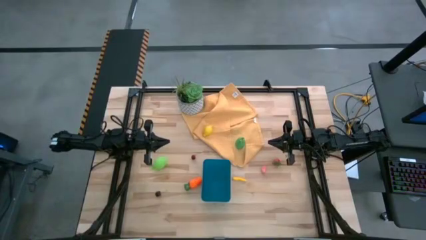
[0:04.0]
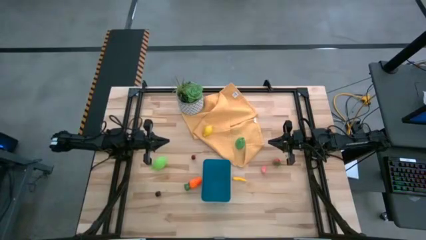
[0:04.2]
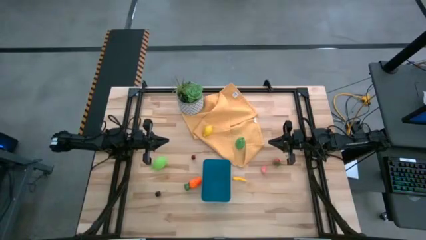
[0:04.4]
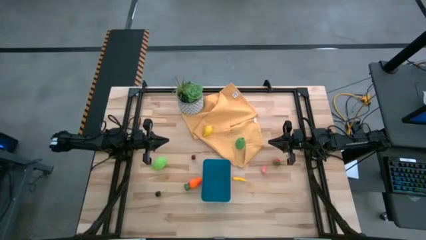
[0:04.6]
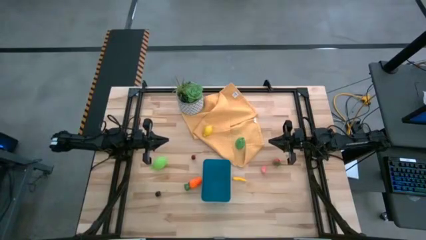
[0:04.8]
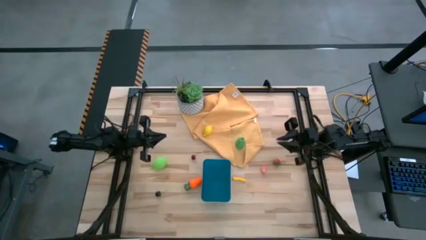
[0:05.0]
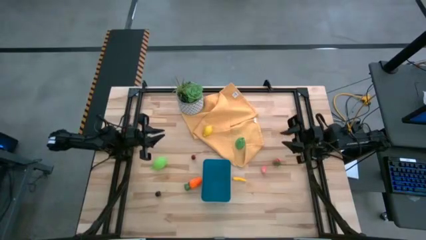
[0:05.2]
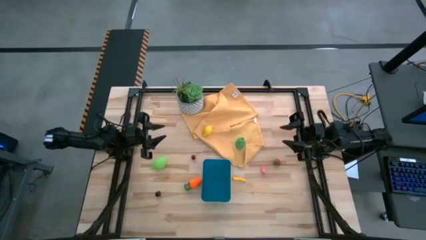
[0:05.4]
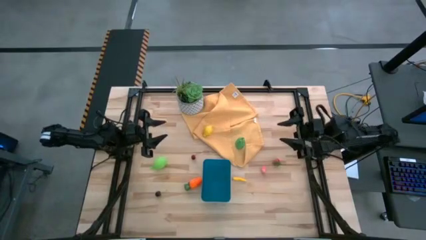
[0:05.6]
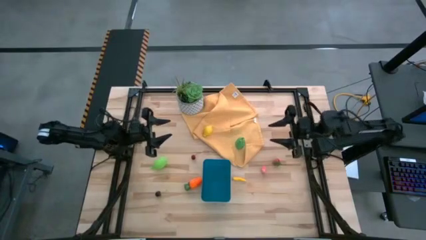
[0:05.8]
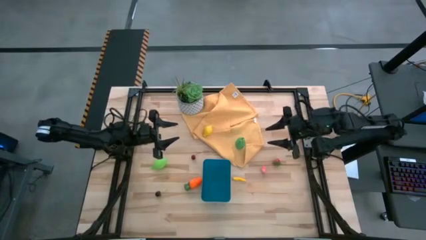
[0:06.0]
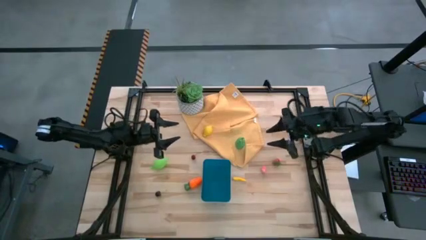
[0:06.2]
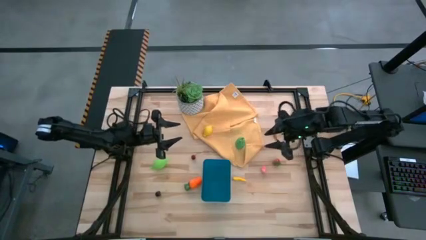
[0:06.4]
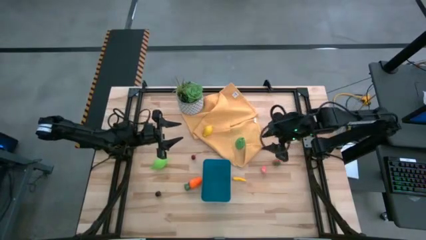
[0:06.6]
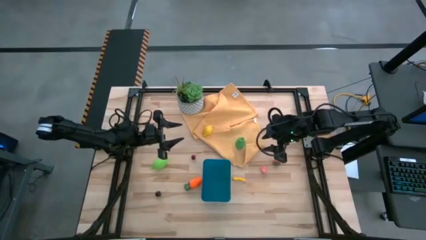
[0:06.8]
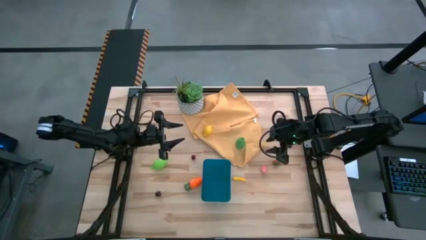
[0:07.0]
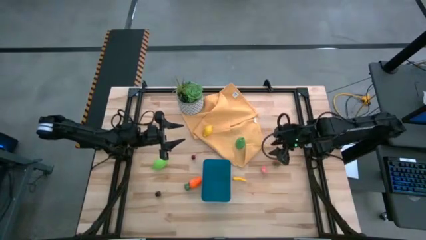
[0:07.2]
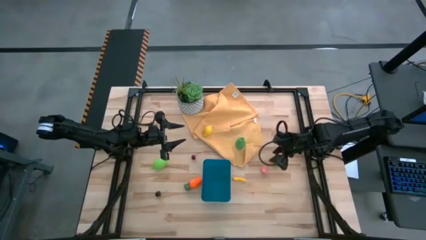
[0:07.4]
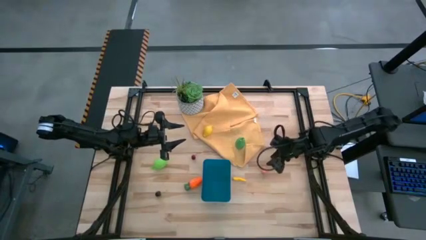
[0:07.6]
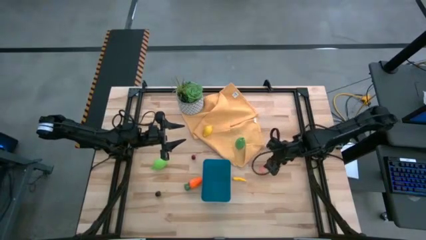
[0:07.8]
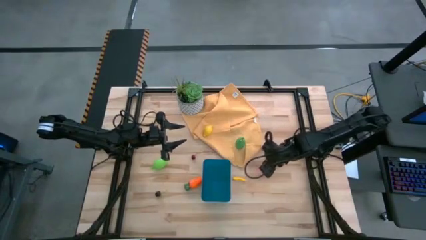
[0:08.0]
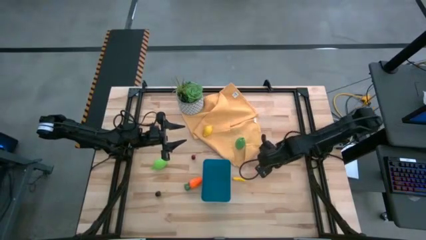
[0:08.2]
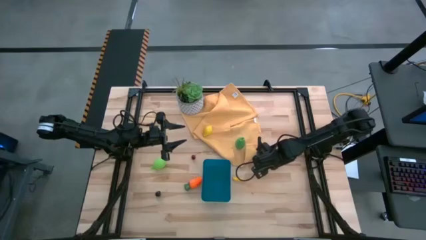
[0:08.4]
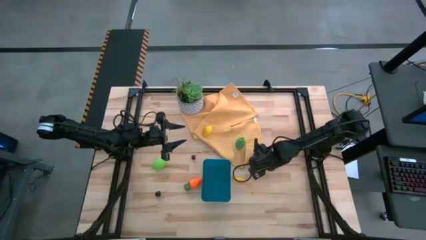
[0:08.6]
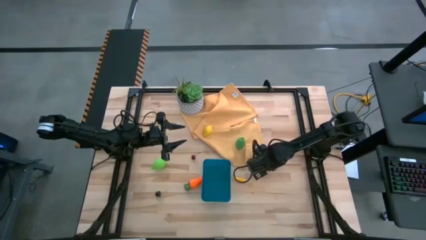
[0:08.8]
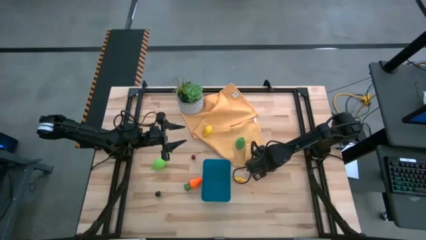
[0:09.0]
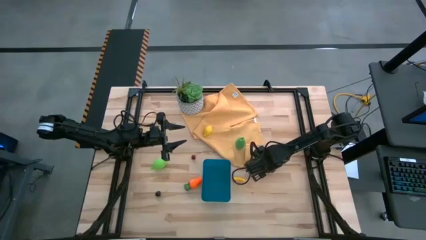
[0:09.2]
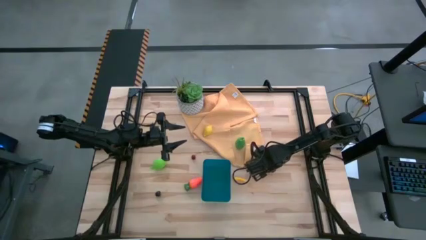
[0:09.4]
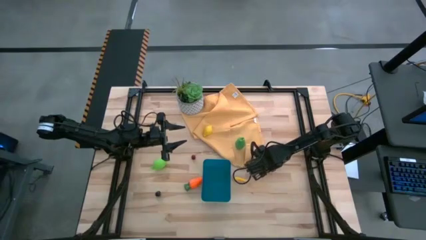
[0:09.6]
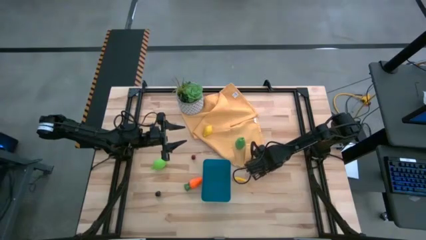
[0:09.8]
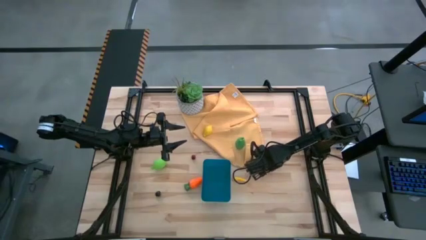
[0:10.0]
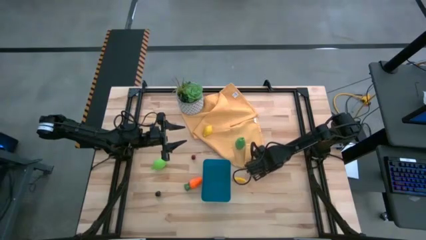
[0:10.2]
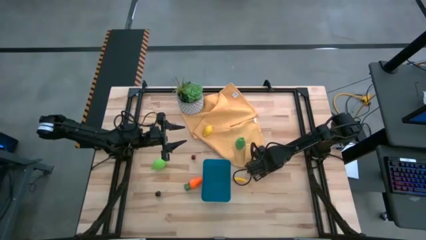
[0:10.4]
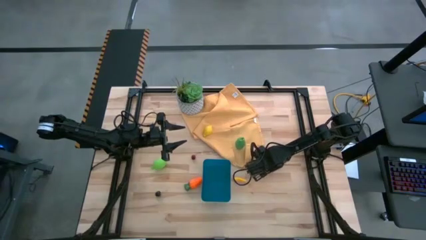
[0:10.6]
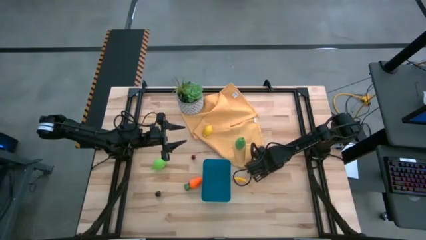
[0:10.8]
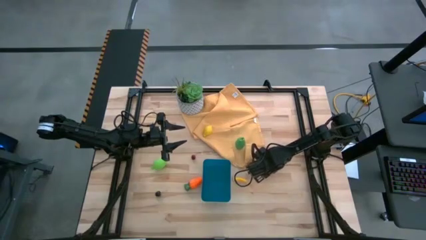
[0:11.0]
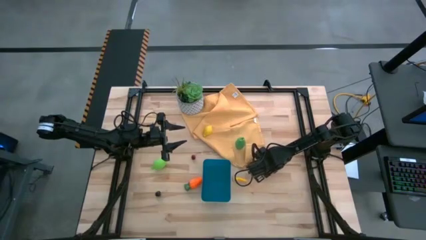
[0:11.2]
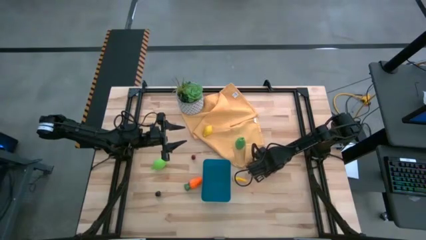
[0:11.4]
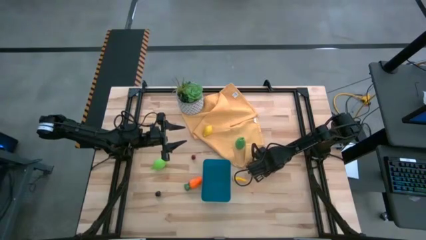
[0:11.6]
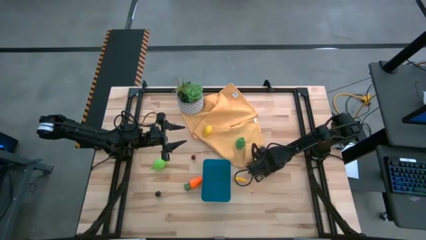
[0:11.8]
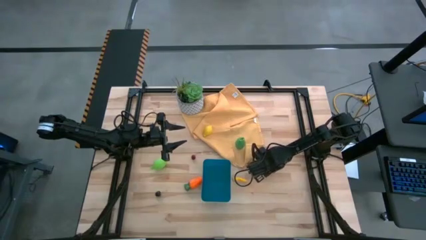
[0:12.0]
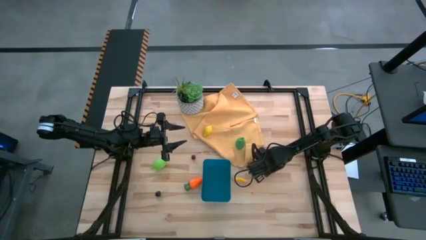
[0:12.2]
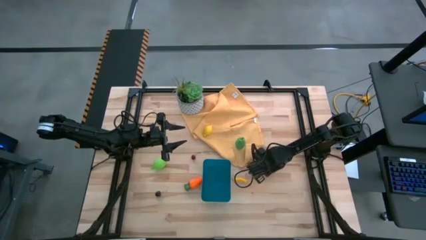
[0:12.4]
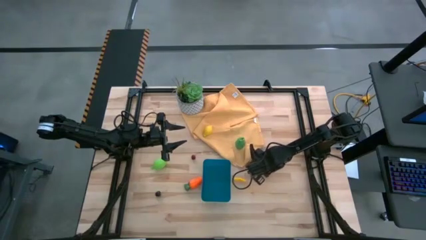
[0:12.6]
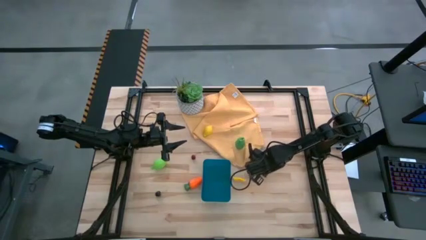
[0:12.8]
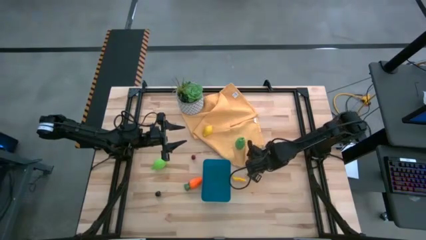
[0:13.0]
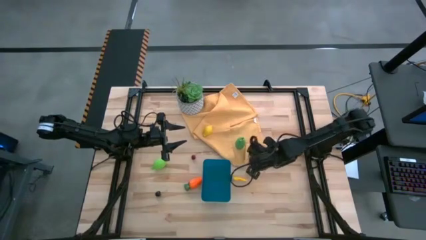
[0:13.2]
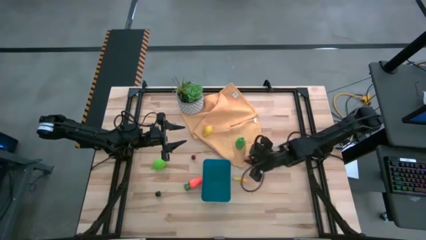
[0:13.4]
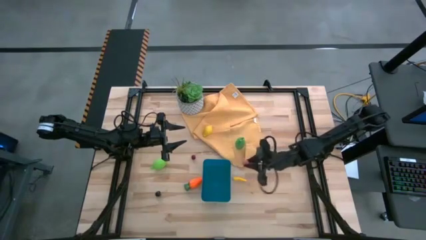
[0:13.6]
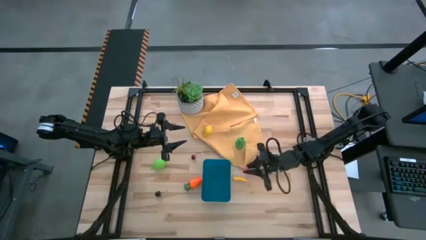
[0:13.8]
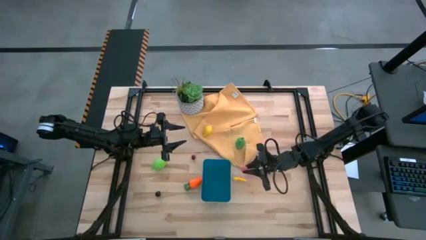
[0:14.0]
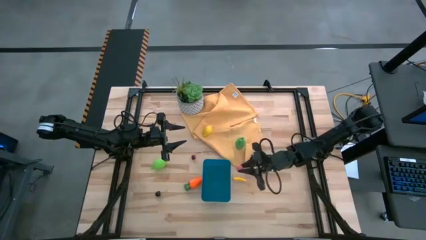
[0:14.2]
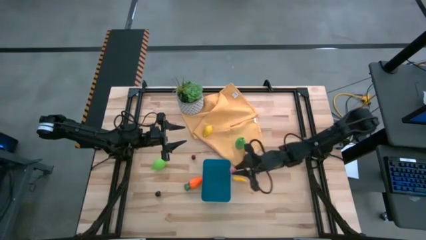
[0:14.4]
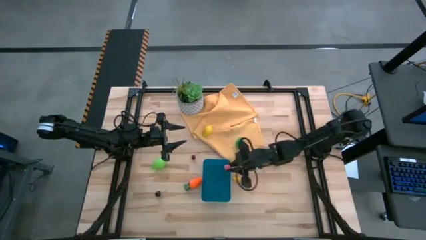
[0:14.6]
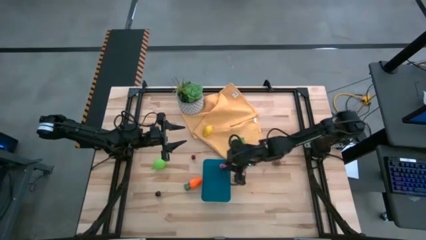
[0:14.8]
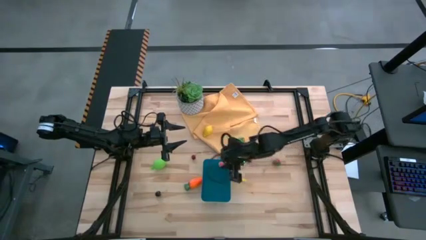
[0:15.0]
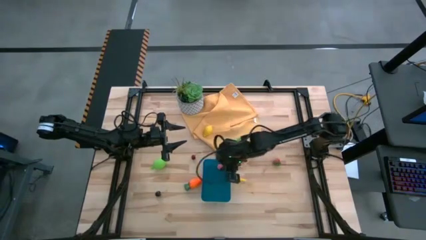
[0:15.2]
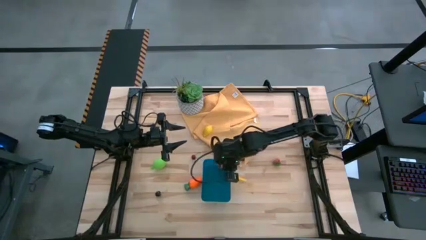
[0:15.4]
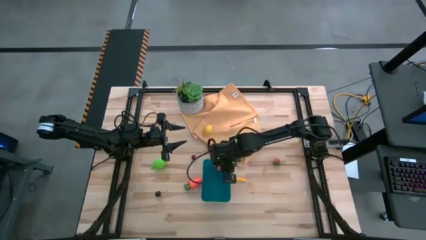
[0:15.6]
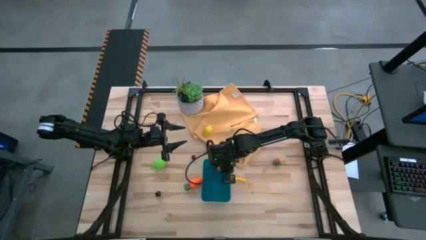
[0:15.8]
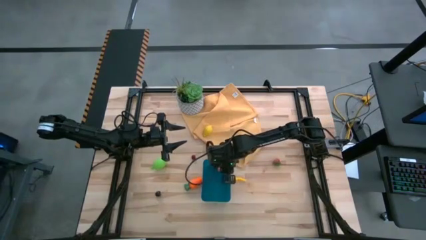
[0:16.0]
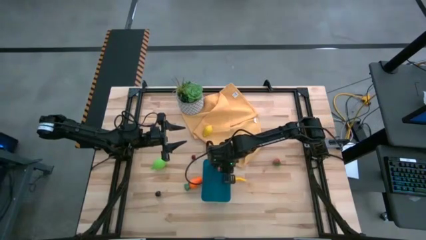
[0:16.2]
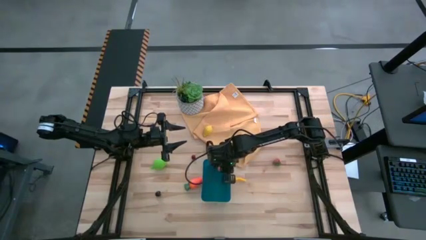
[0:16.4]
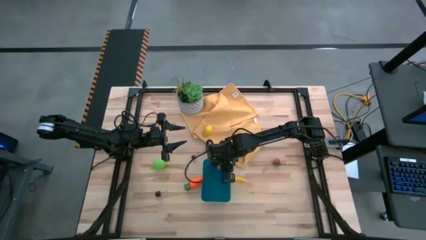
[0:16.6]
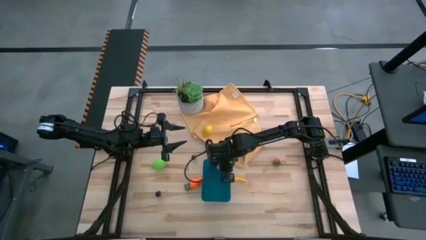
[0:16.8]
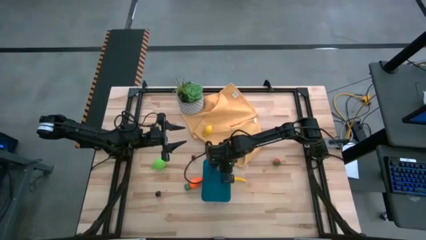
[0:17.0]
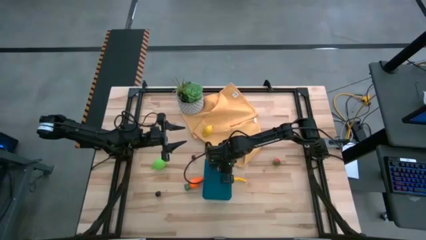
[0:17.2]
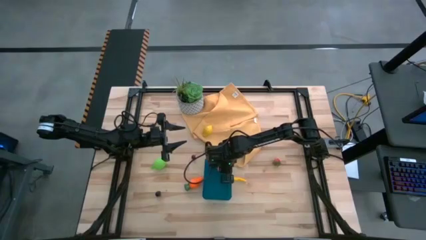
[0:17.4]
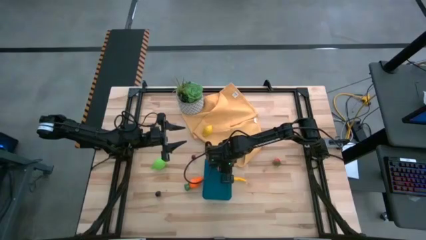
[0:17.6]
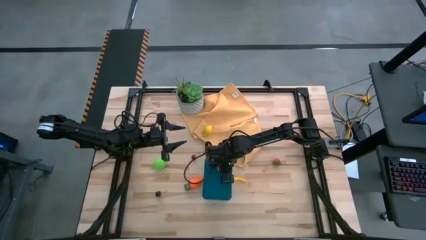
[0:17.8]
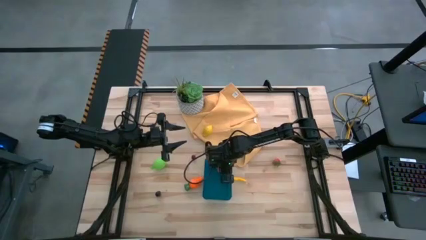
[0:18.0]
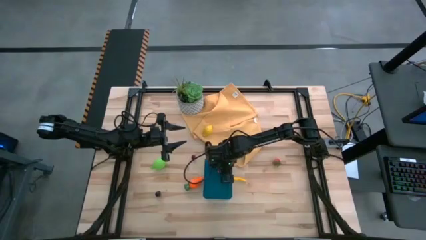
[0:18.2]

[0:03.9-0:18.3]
Task: Pick and placing Produce into tupperware
Put the apricot into the bin
